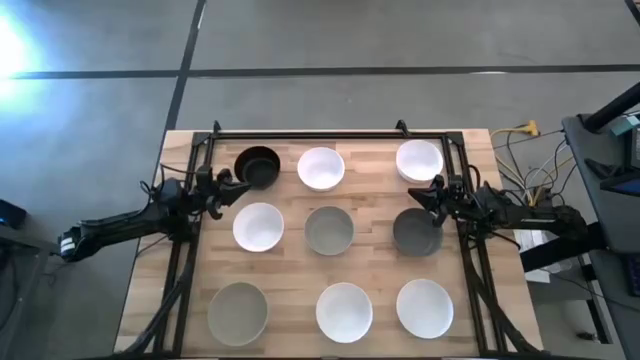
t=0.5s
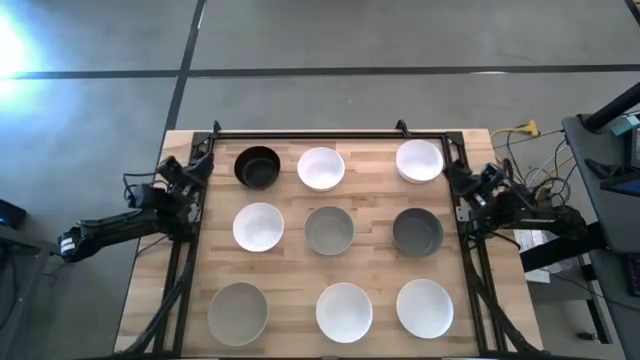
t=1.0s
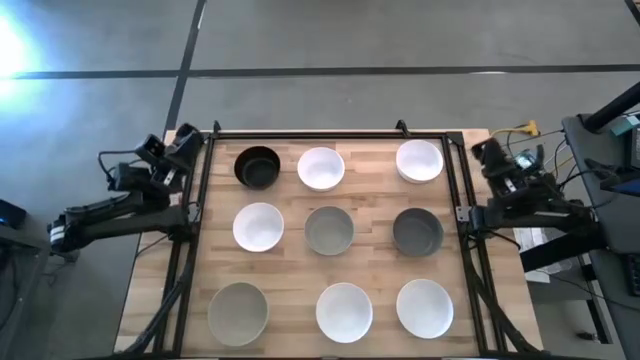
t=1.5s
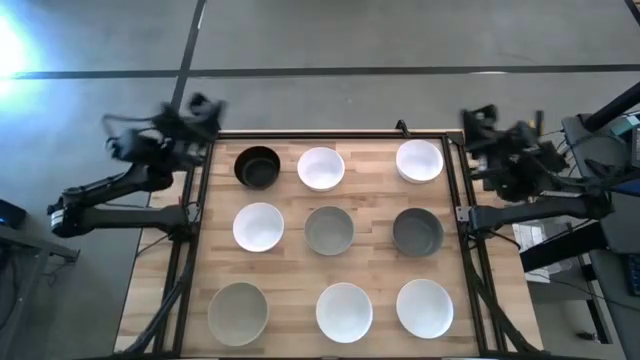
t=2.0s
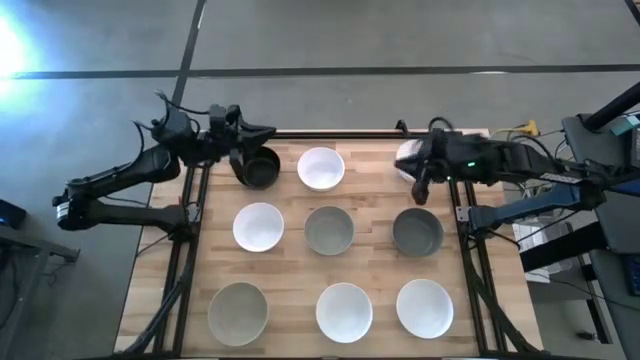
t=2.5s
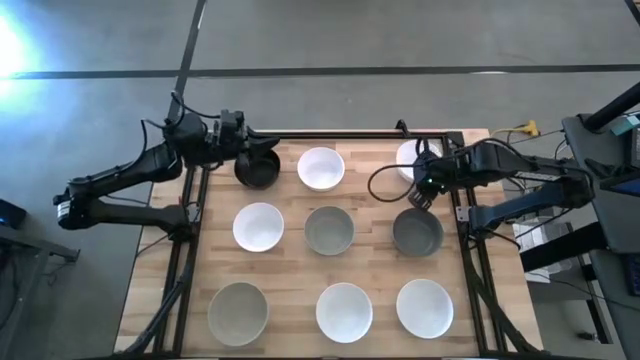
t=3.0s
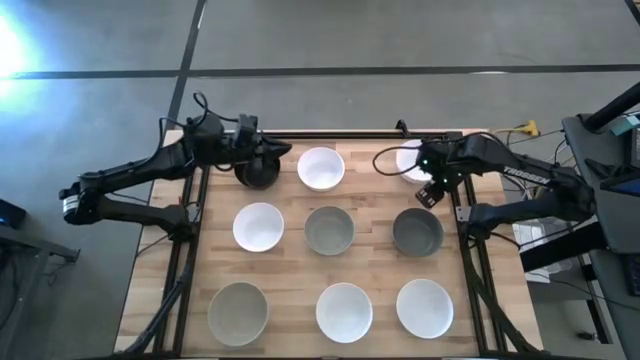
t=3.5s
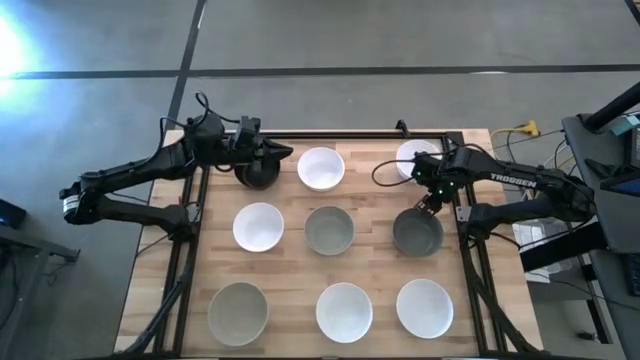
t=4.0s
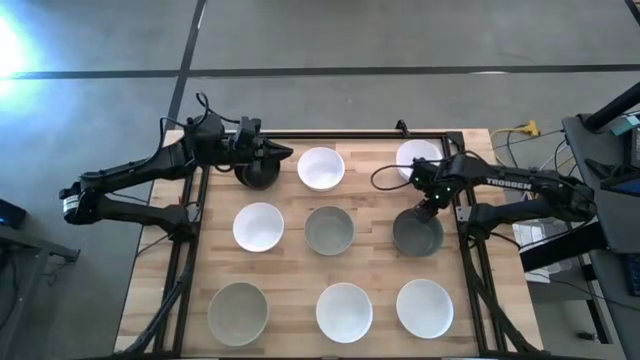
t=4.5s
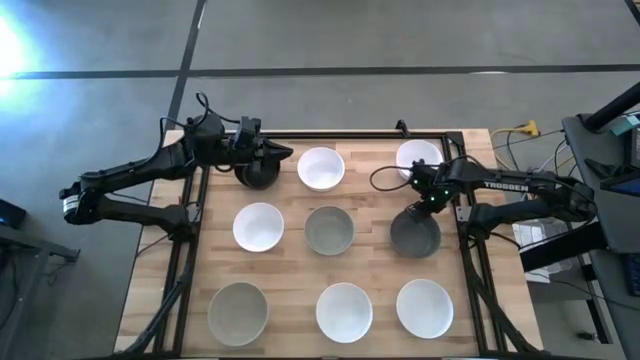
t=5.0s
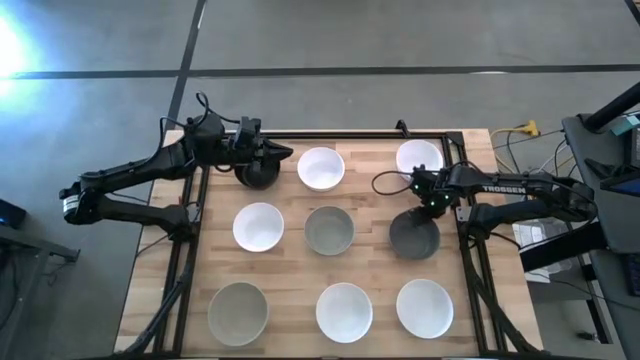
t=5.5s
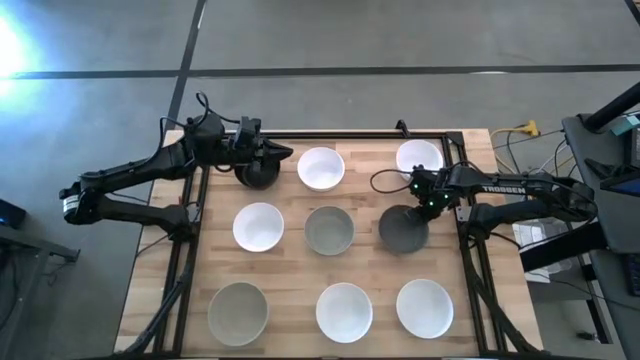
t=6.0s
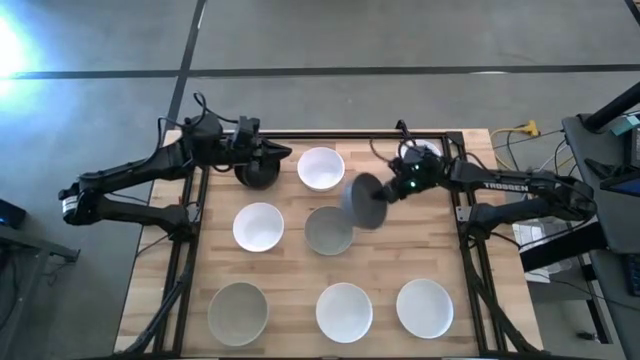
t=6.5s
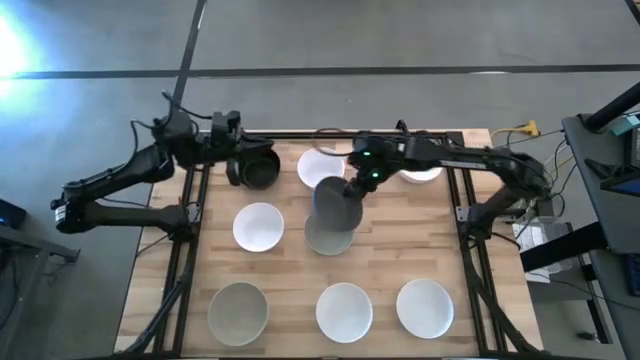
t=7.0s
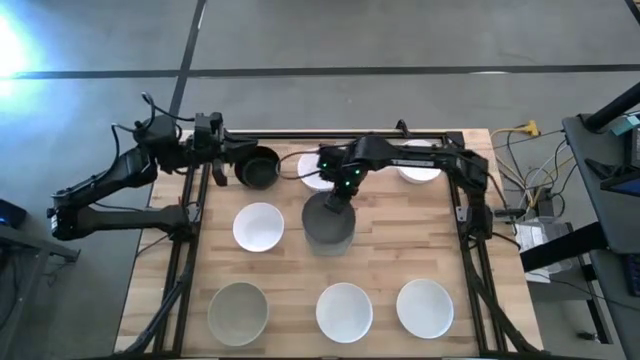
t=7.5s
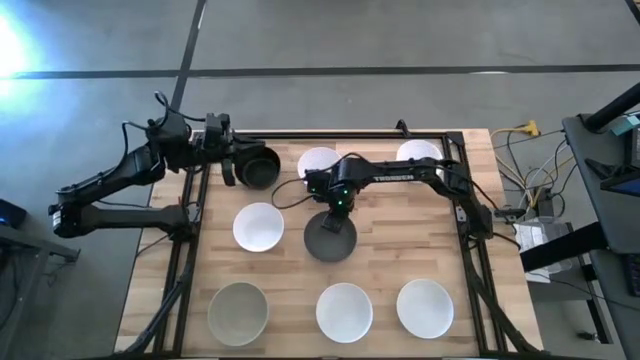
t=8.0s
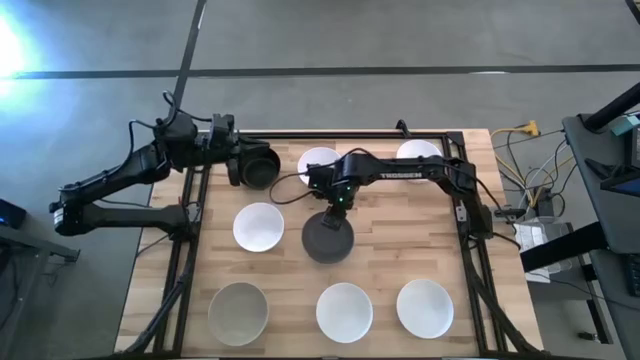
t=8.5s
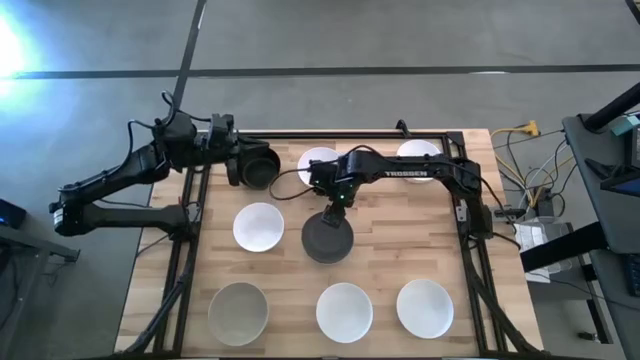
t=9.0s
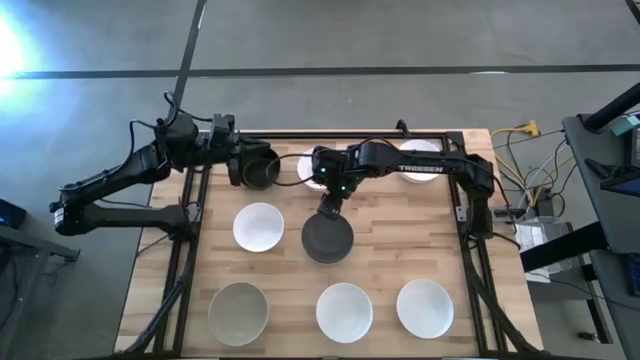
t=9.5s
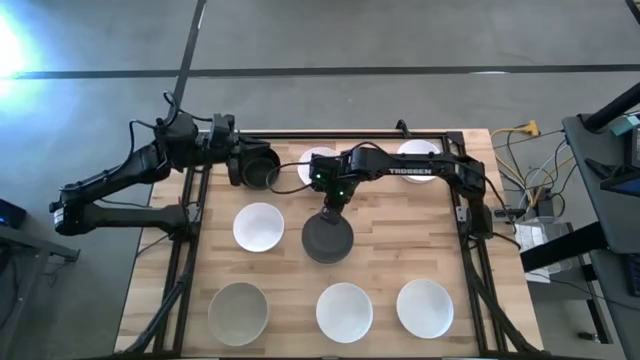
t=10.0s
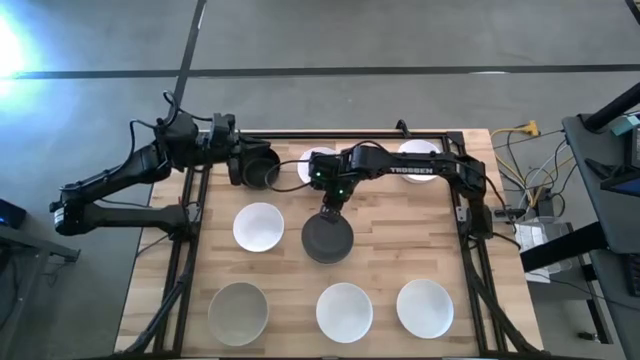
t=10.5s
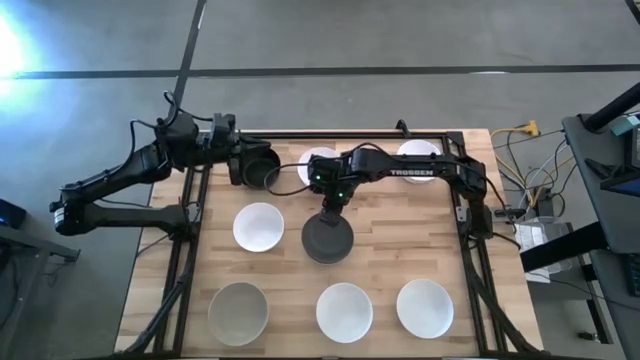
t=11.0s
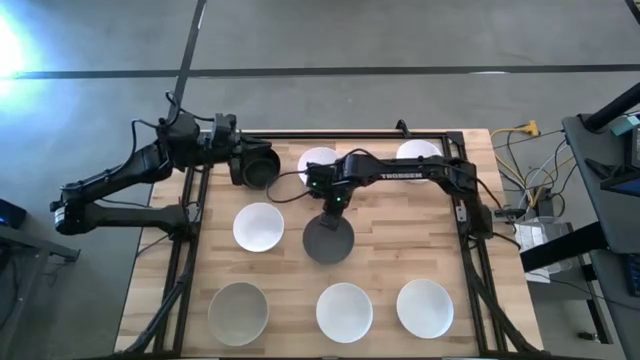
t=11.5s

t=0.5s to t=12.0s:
Task: Nest bowls inside each other
Stack the dark grey bowl on top of the gray bowl

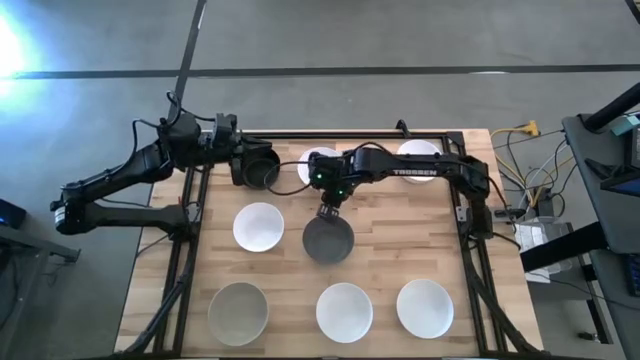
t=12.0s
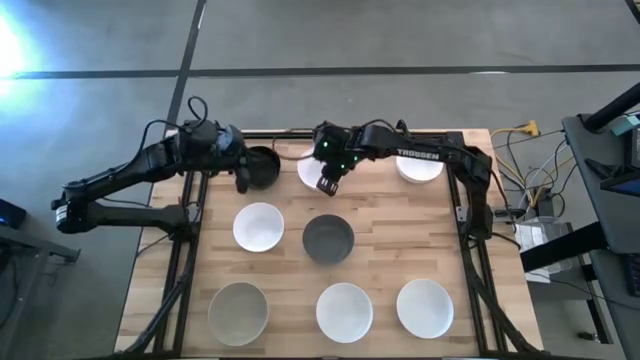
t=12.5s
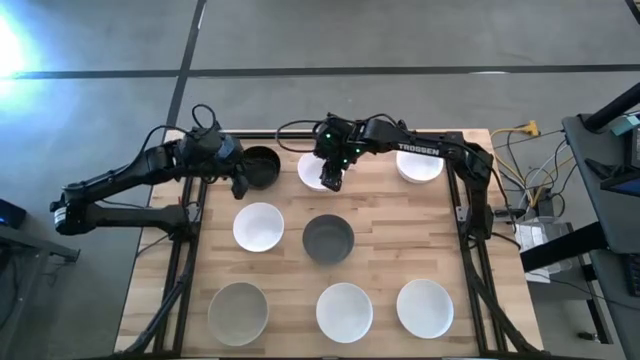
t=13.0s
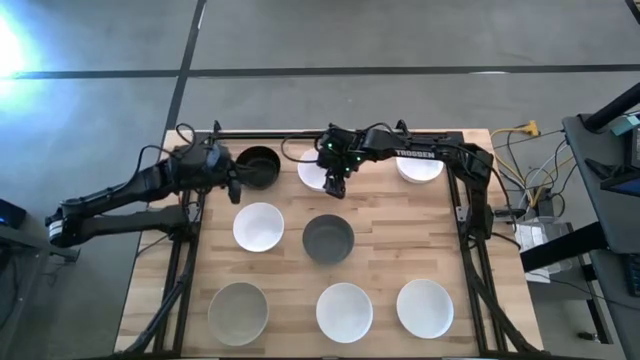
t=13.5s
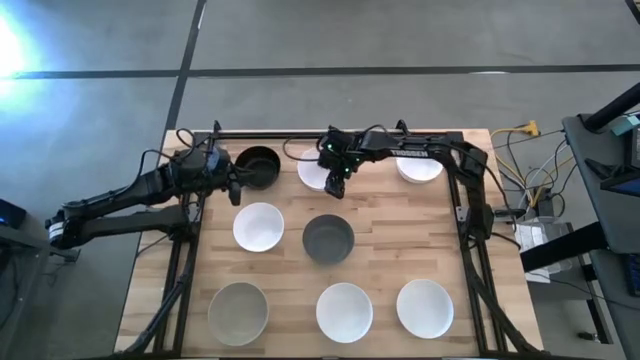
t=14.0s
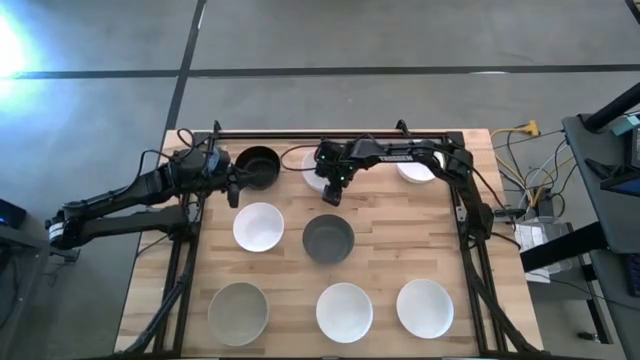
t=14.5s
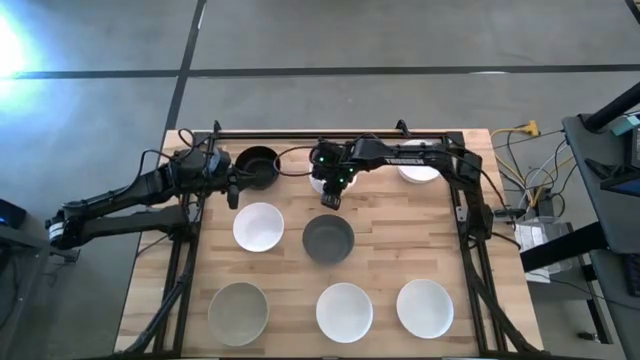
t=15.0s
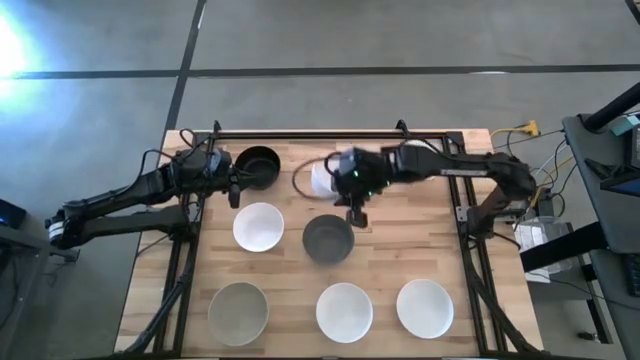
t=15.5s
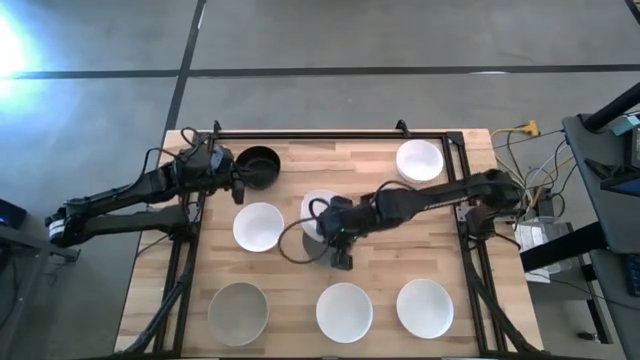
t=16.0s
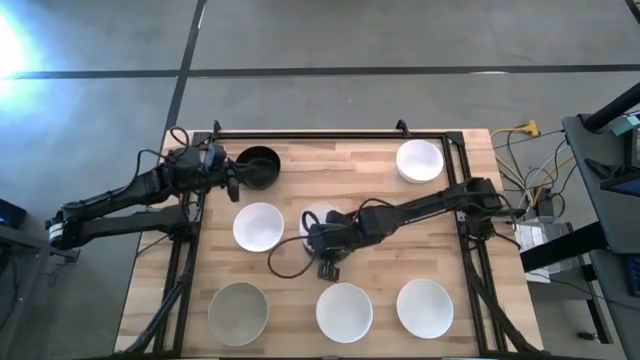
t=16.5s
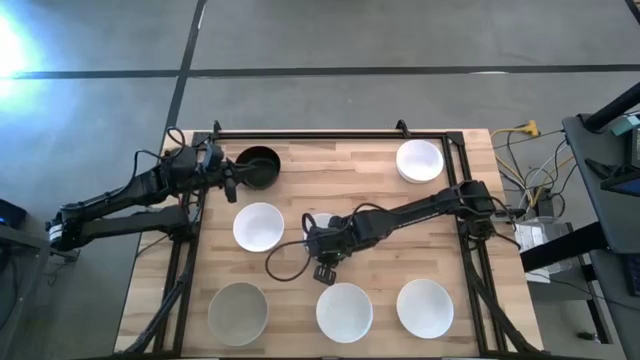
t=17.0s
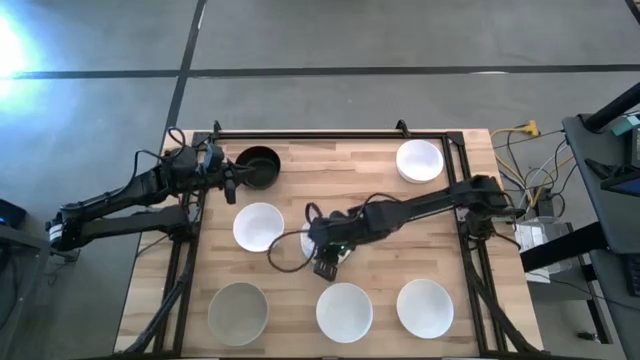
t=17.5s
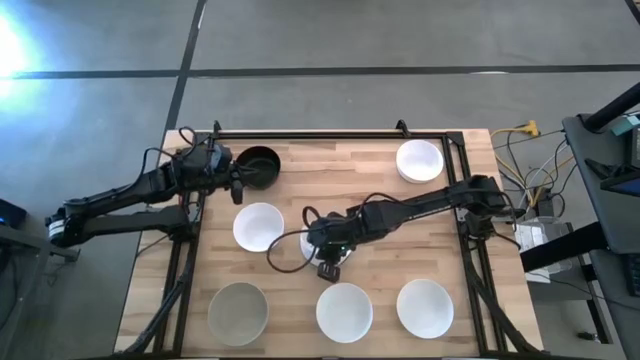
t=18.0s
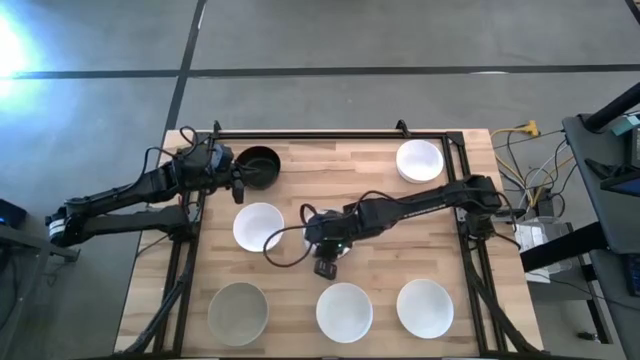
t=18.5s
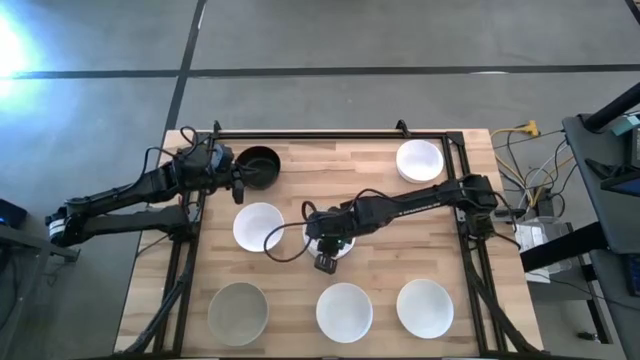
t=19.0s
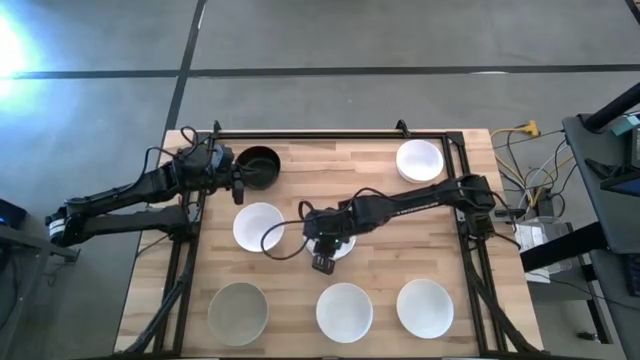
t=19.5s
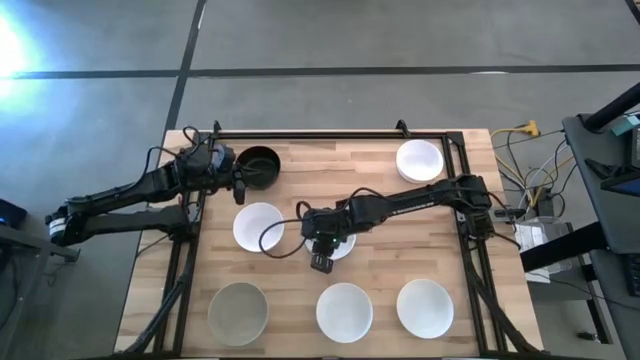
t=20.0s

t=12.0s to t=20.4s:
Stack the white bowl on top of the dark grey bowl
